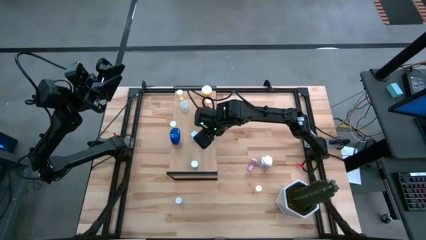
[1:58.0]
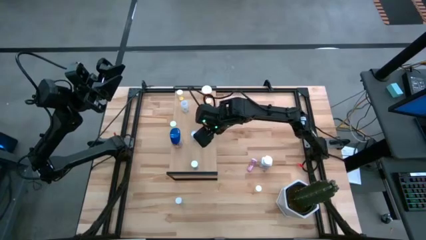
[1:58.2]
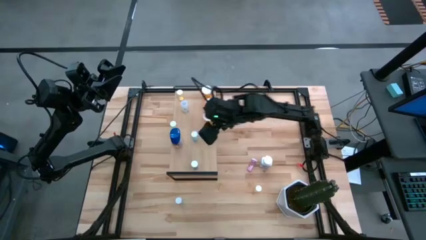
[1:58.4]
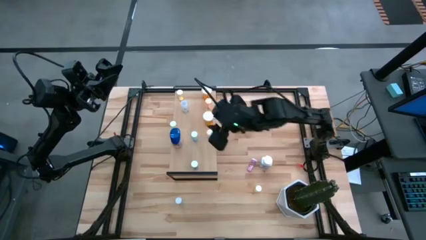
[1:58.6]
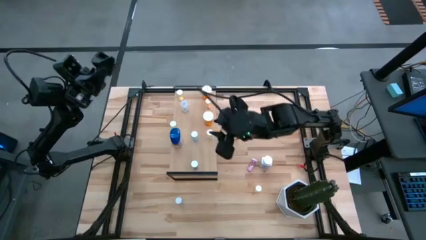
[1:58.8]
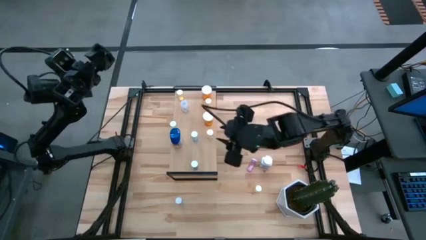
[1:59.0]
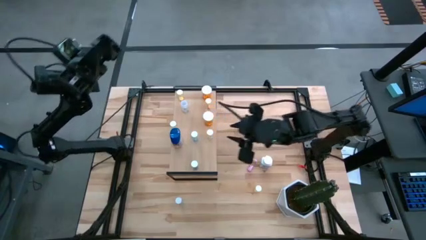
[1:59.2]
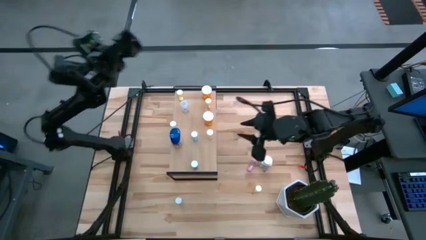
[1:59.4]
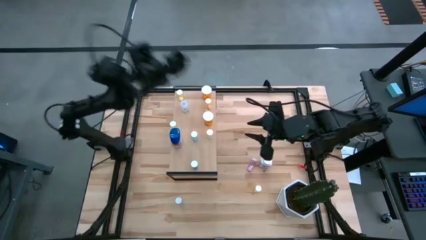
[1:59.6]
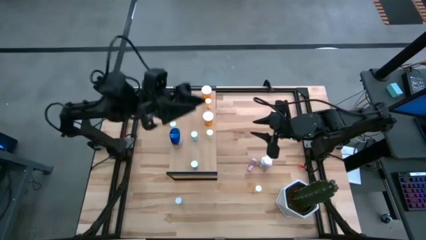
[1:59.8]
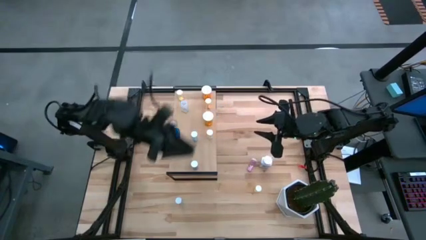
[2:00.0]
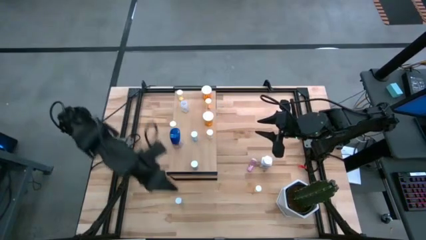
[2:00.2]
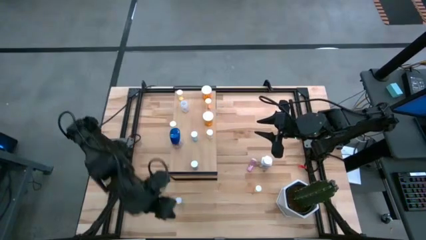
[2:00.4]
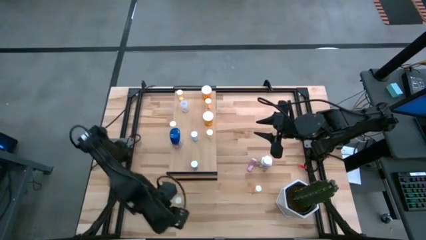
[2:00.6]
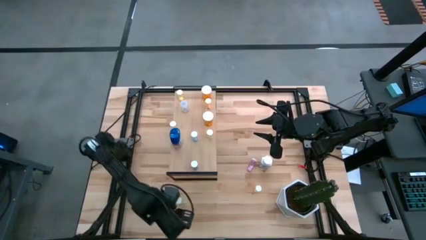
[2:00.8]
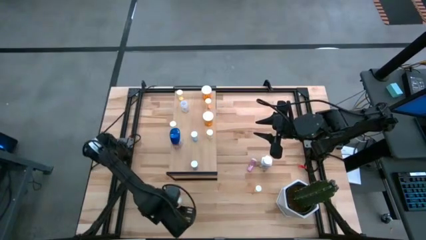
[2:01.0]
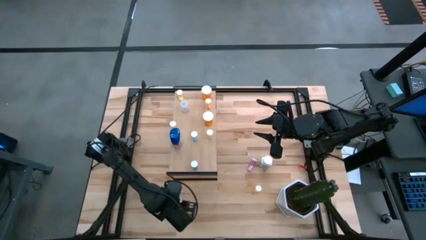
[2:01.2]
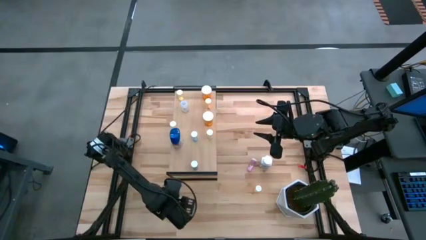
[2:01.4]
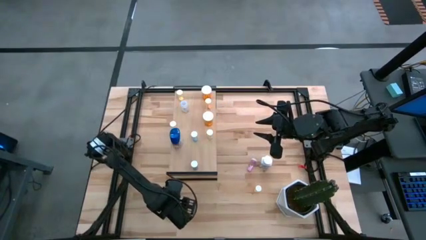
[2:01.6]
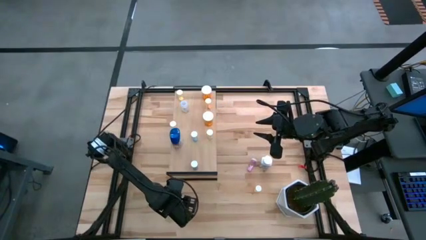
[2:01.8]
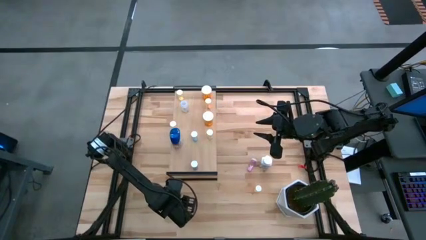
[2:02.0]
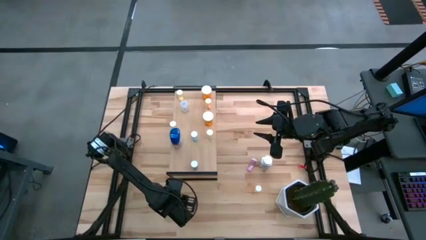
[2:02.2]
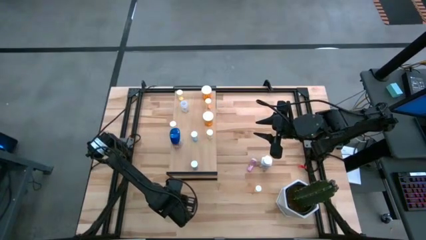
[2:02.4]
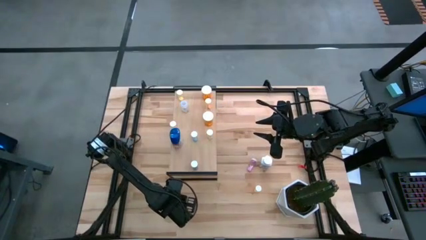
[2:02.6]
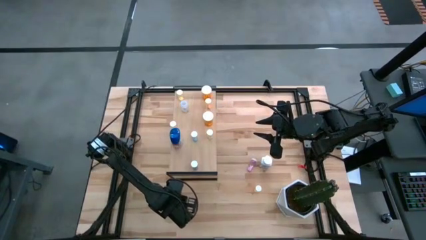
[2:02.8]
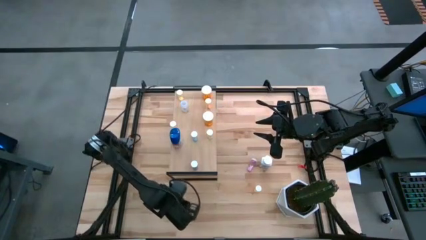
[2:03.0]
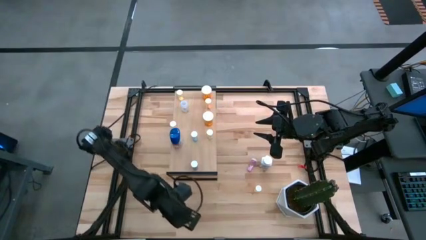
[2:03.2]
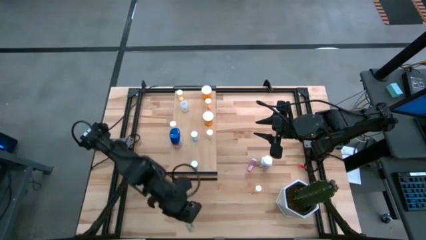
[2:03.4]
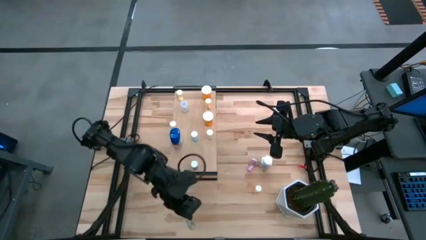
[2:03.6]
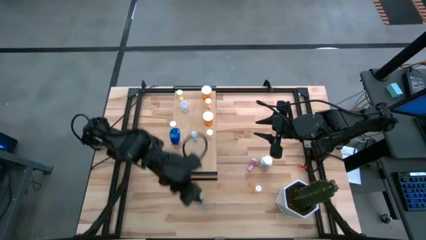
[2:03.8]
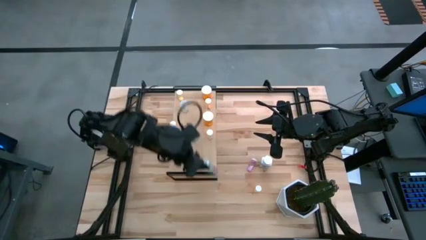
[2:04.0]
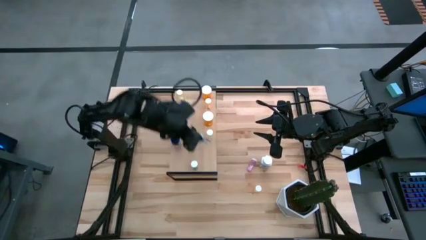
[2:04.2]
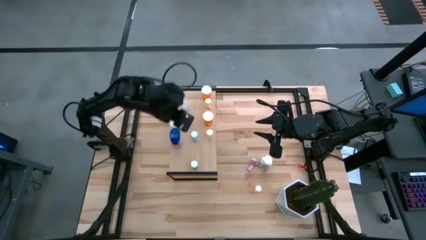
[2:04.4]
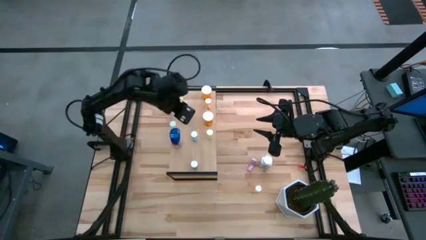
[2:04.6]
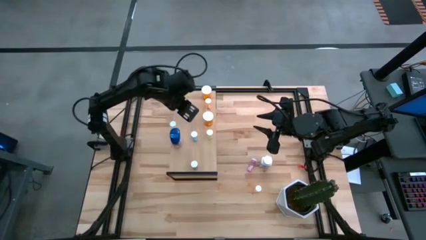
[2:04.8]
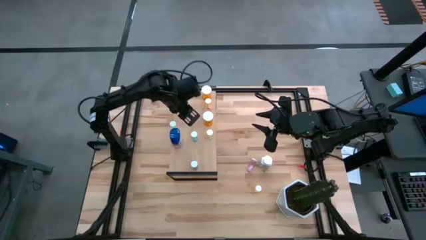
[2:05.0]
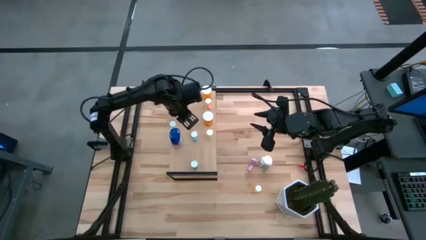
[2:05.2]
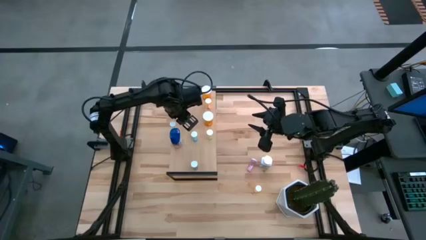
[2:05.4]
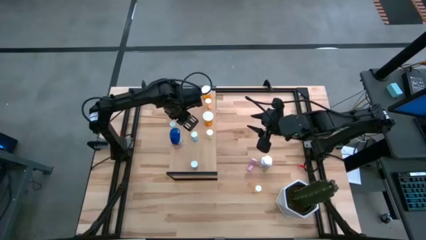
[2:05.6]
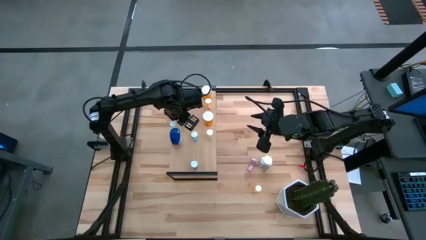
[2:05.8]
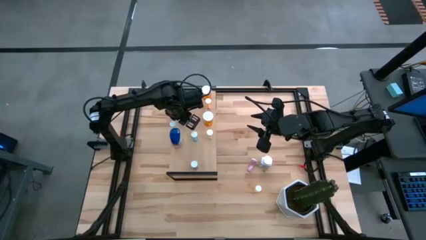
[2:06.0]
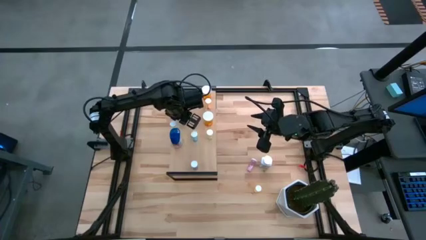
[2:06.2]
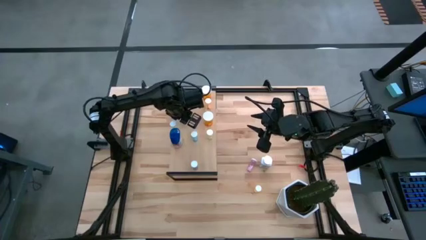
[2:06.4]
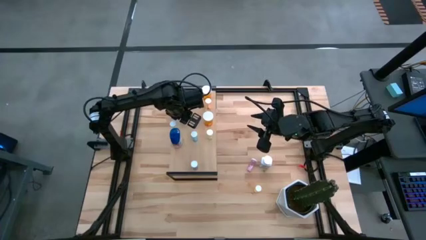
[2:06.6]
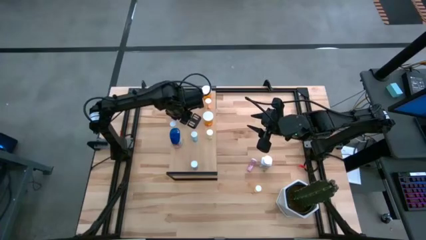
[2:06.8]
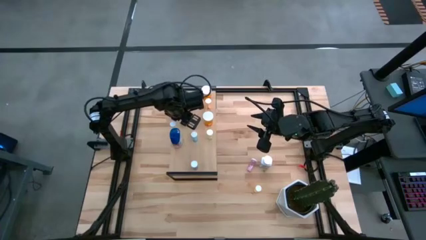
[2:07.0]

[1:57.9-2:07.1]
Task: Pick and place medicine bottles onto shelf by color
Put the blue pill bottle on the shelf

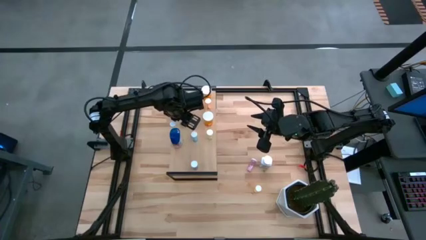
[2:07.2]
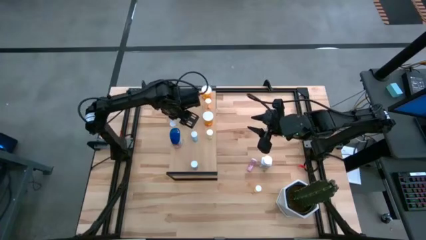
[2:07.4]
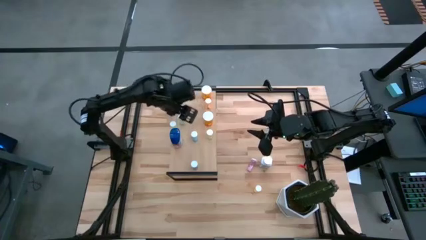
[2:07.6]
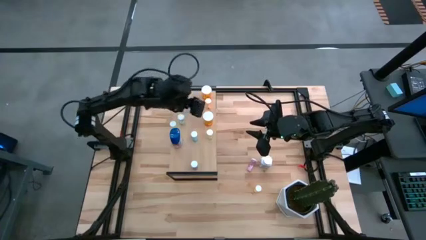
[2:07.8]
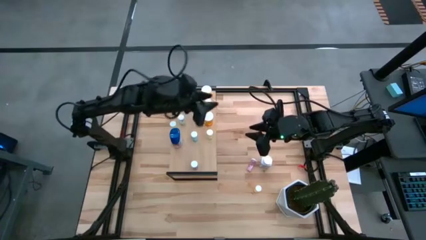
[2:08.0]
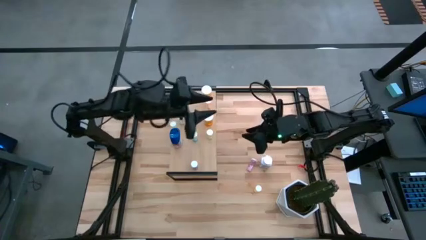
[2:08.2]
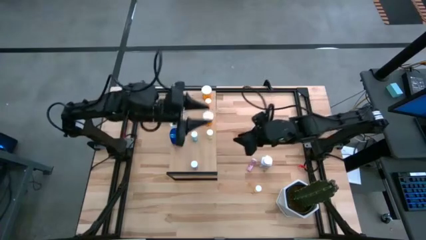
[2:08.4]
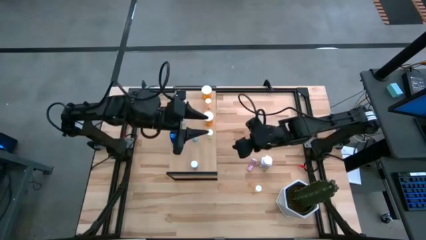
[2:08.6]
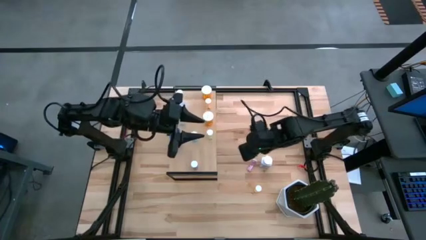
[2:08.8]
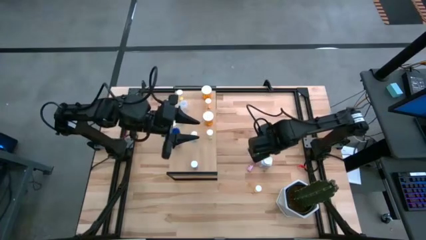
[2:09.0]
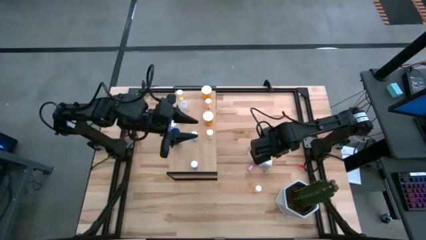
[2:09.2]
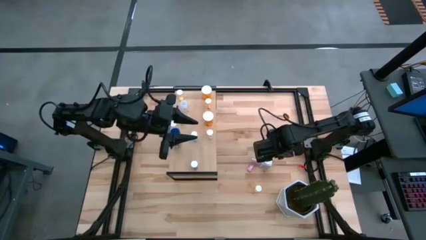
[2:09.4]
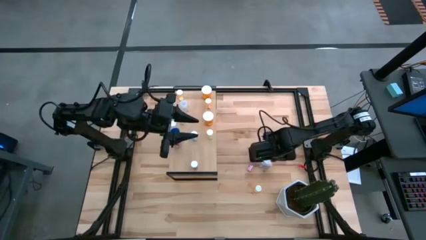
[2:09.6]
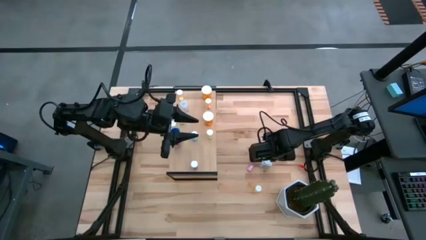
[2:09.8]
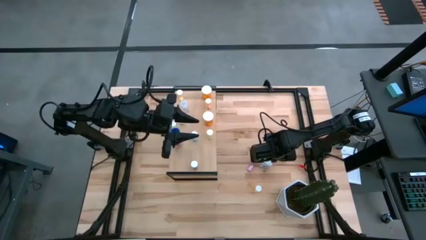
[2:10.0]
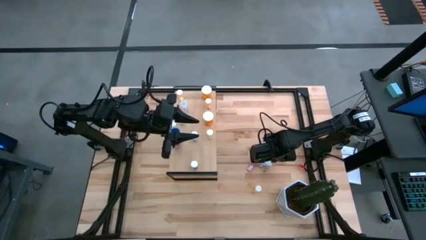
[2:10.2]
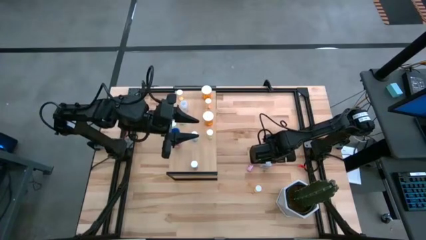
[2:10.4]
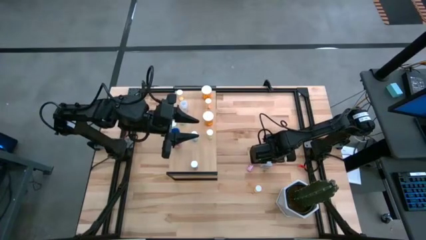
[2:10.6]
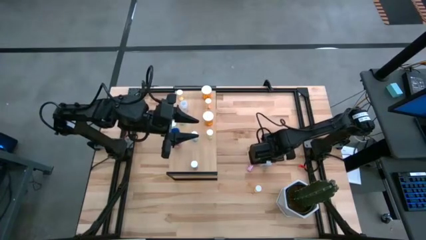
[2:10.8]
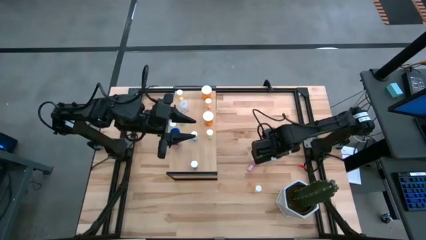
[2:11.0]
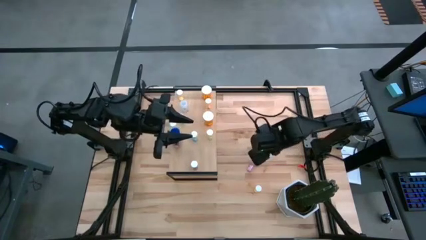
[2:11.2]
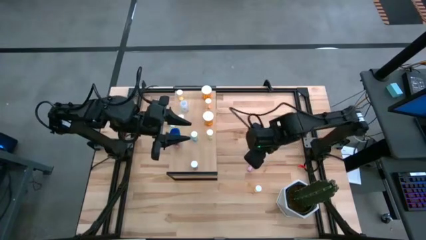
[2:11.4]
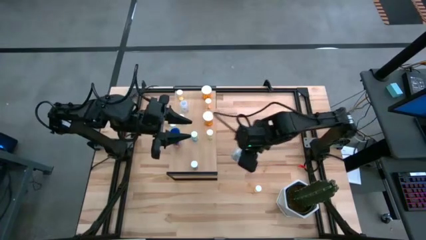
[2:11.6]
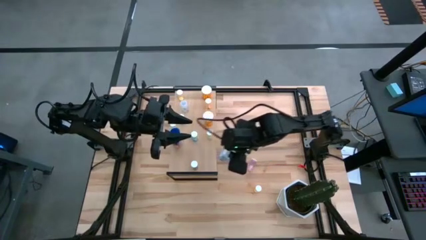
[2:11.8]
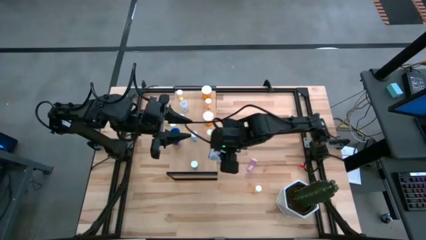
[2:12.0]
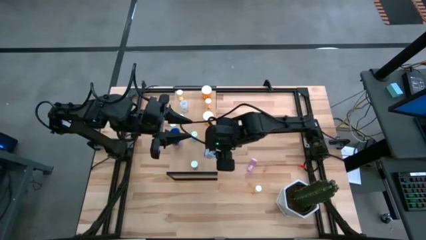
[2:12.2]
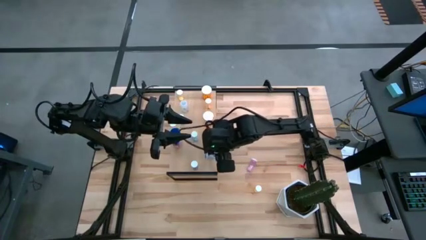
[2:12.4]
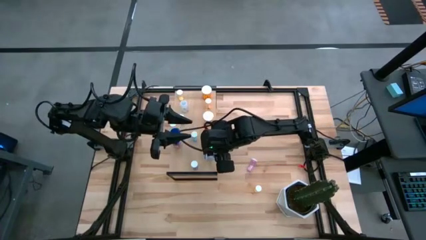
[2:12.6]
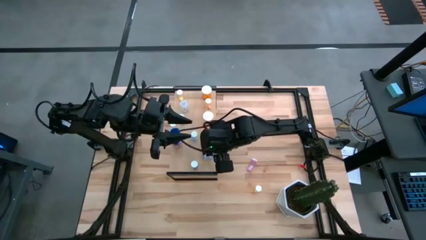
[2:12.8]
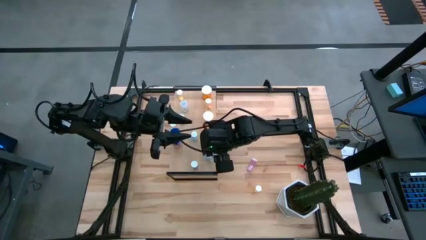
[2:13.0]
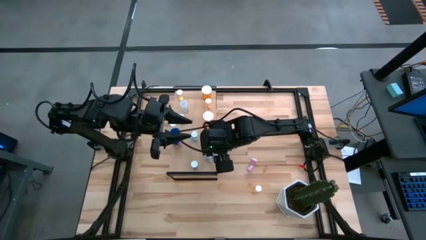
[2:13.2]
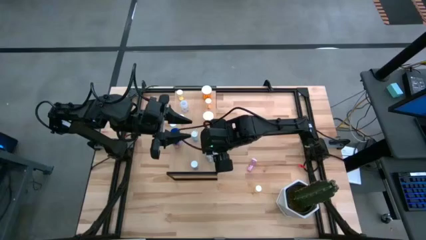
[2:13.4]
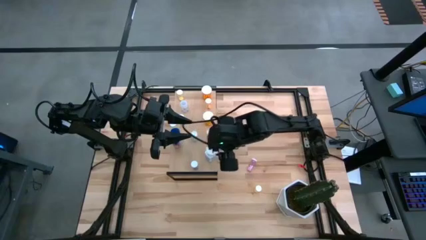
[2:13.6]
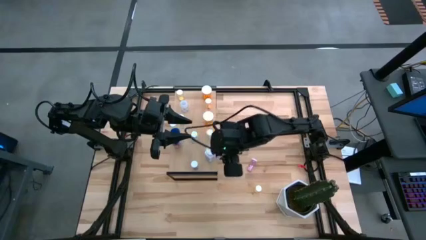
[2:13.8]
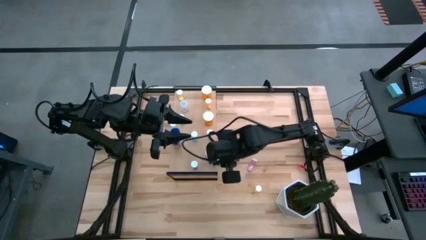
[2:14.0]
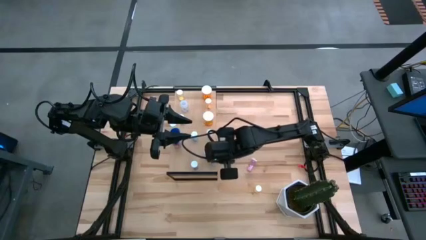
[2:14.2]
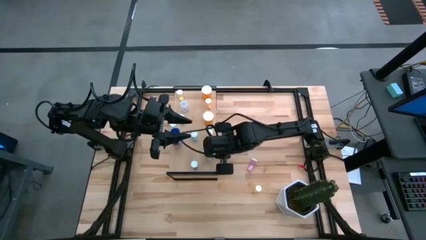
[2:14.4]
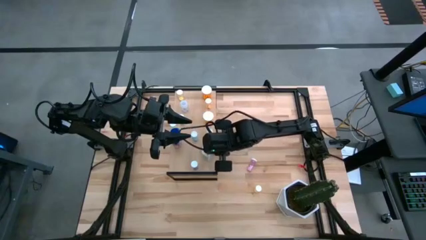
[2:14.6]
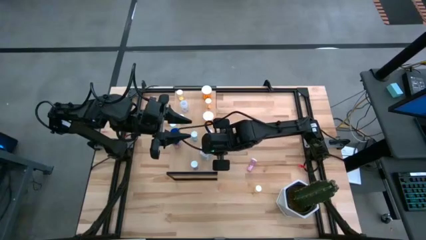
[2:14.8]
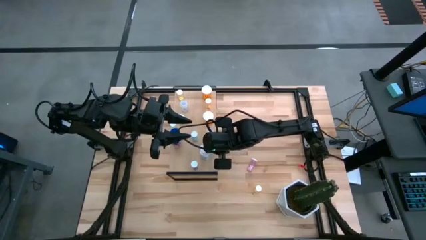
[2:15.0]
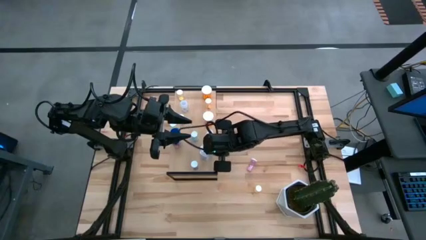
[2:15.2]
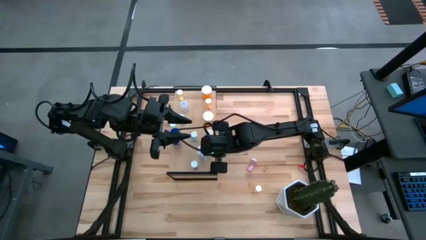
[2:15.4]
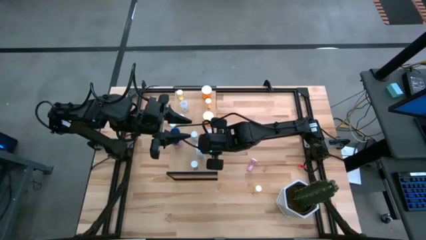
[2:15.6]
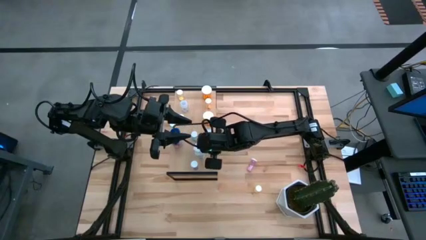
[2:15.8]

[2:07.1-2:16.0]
Put the white and blue pill bottle on the shelf
